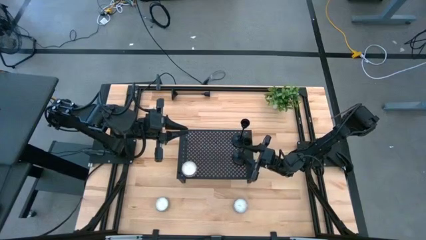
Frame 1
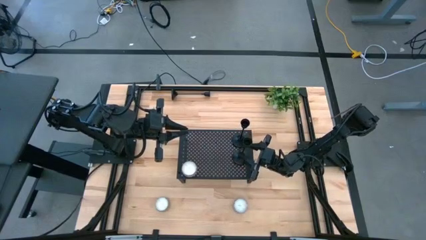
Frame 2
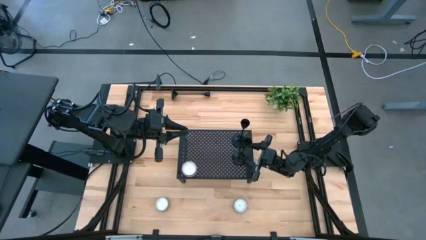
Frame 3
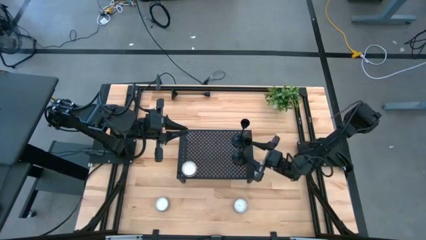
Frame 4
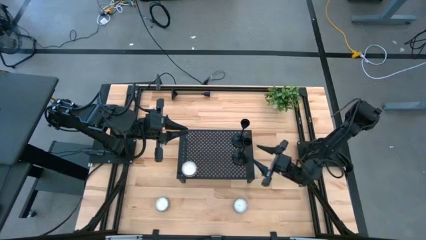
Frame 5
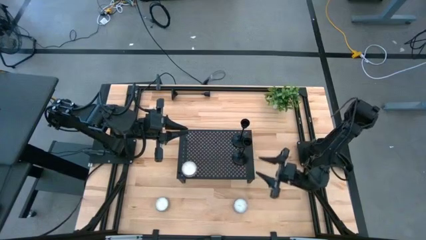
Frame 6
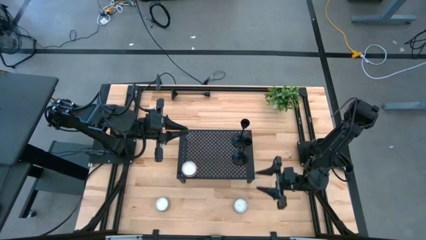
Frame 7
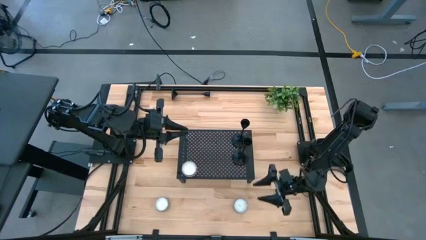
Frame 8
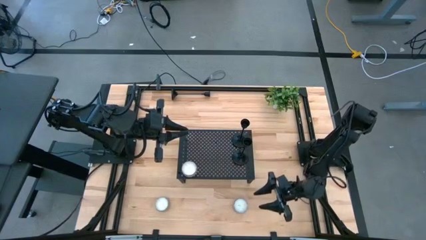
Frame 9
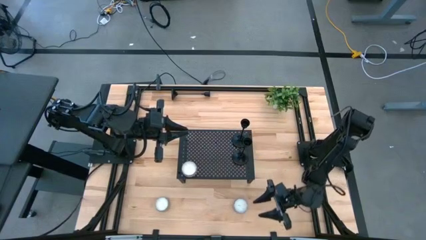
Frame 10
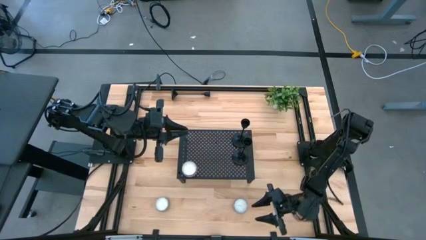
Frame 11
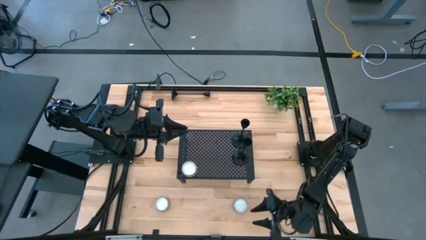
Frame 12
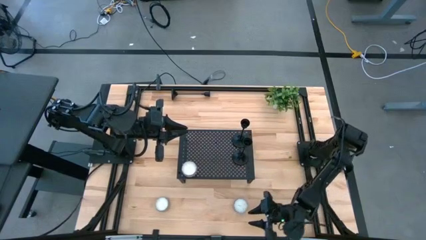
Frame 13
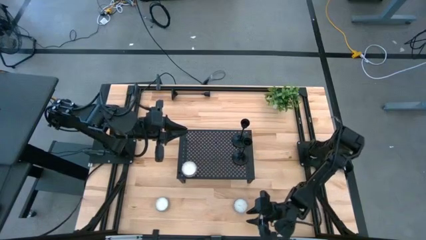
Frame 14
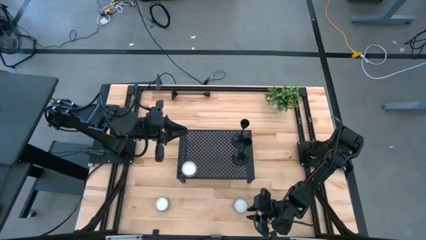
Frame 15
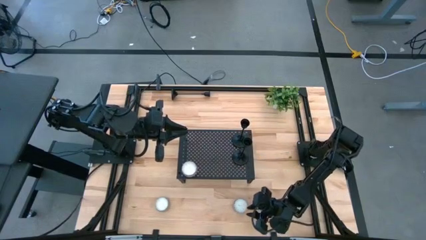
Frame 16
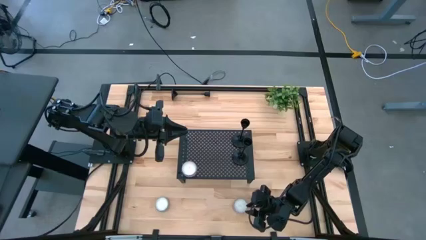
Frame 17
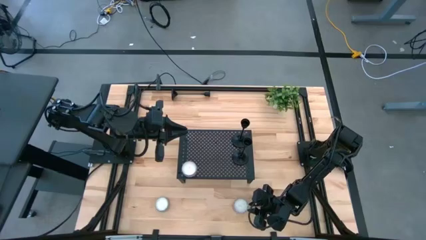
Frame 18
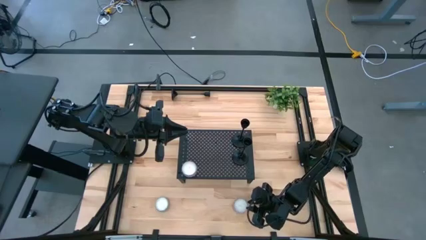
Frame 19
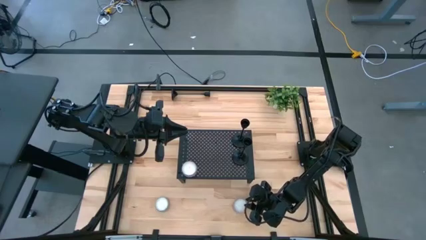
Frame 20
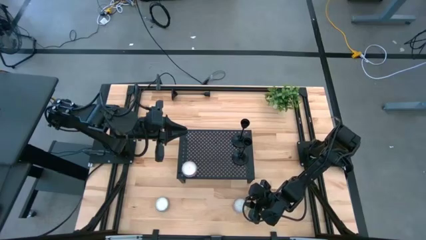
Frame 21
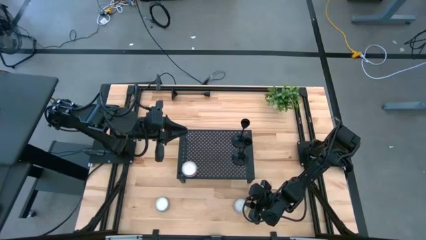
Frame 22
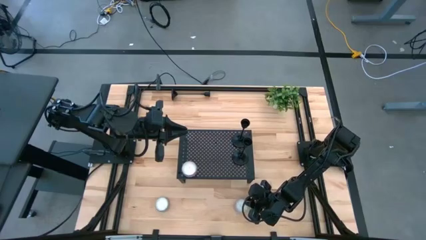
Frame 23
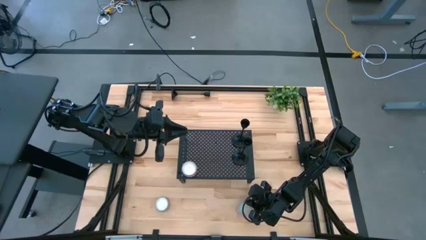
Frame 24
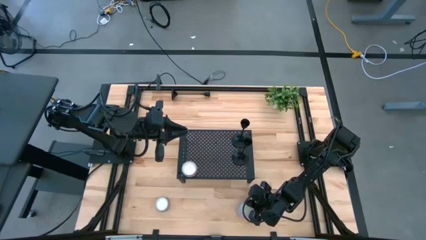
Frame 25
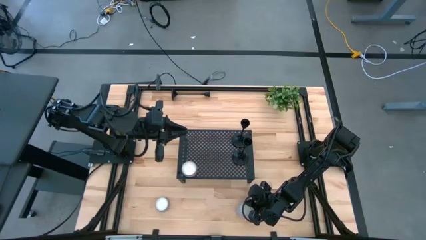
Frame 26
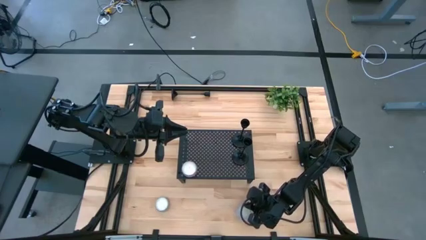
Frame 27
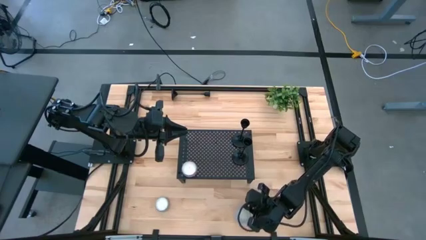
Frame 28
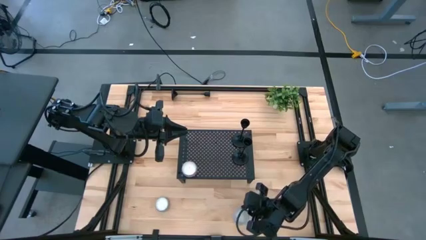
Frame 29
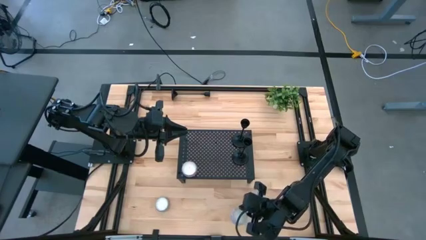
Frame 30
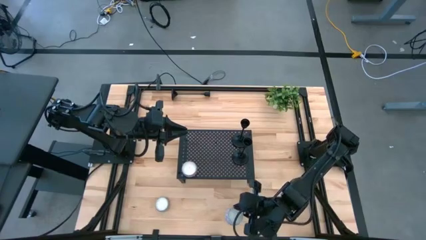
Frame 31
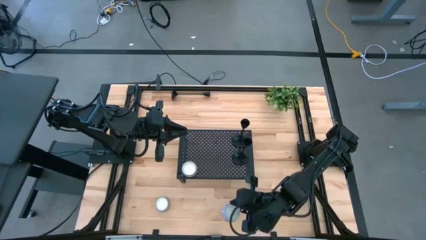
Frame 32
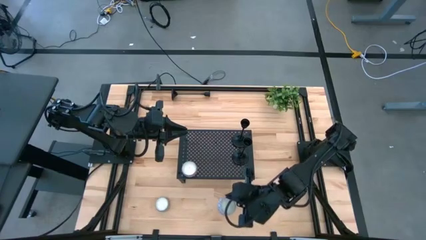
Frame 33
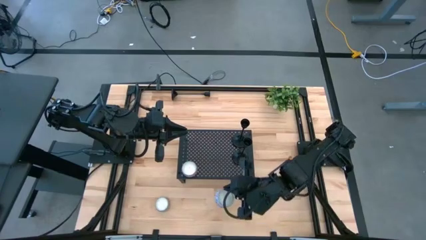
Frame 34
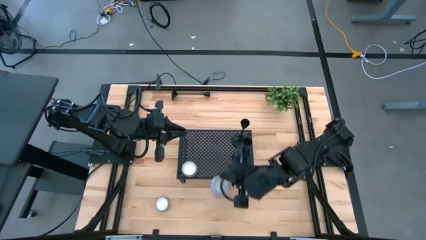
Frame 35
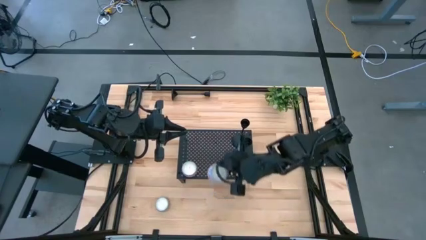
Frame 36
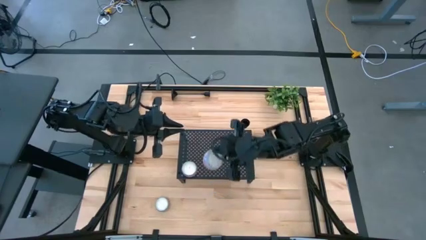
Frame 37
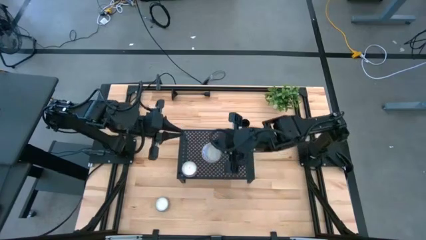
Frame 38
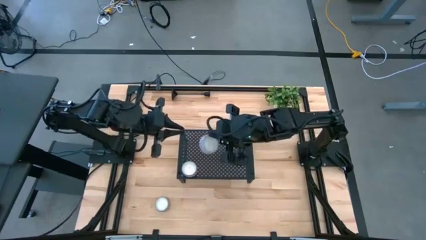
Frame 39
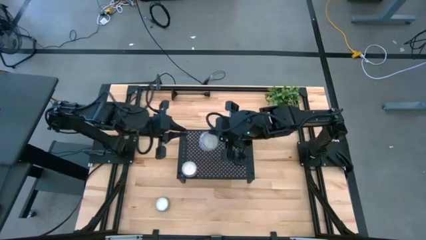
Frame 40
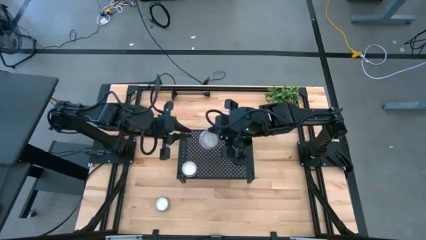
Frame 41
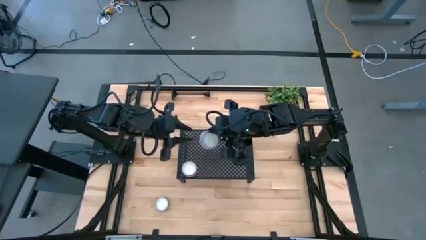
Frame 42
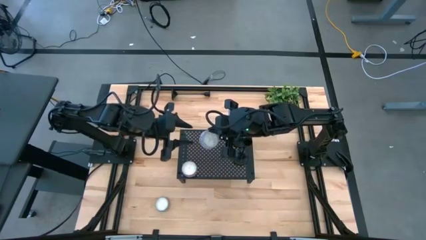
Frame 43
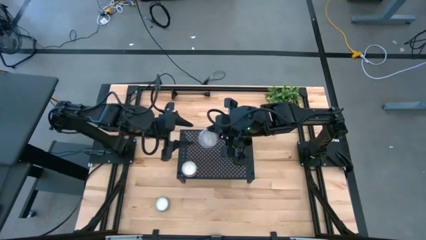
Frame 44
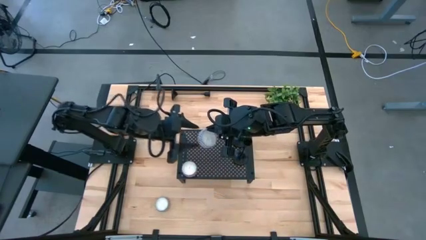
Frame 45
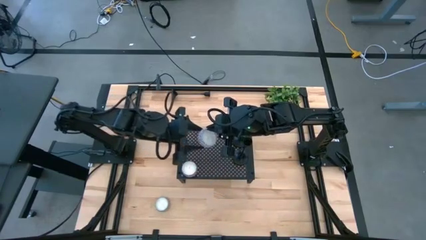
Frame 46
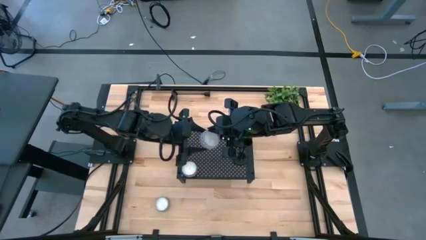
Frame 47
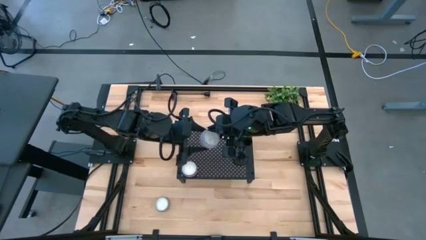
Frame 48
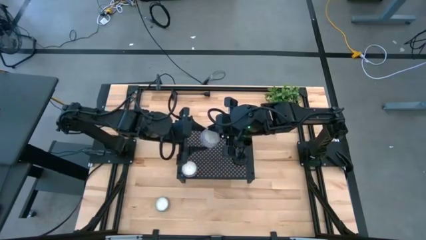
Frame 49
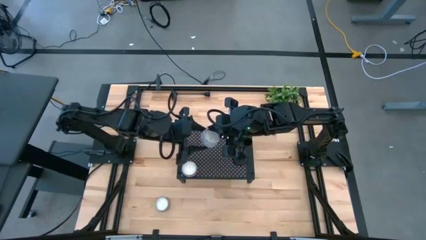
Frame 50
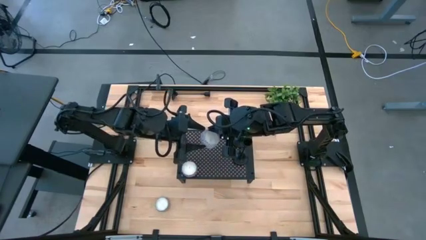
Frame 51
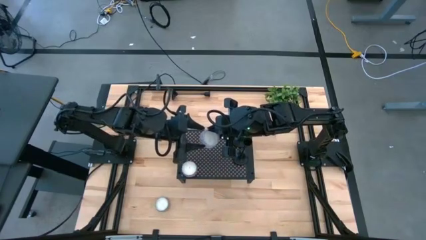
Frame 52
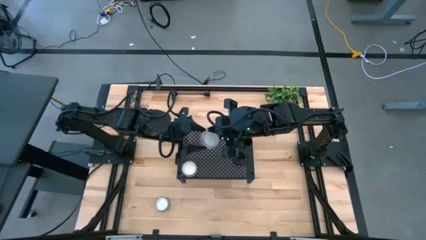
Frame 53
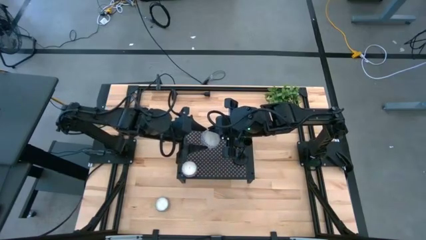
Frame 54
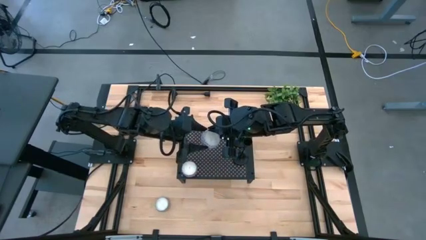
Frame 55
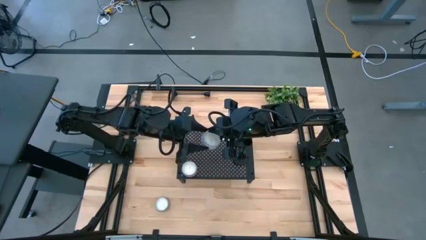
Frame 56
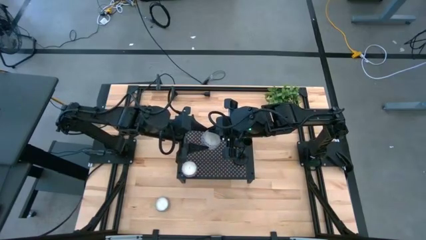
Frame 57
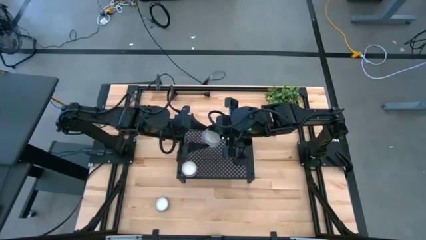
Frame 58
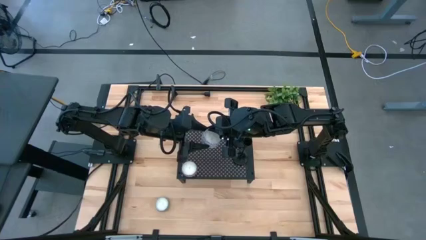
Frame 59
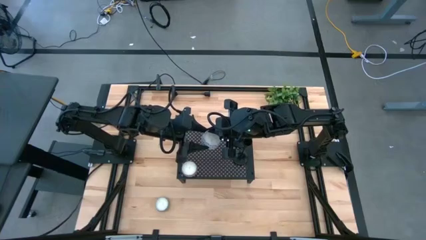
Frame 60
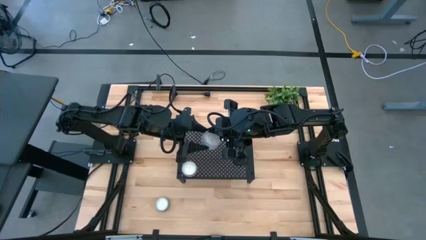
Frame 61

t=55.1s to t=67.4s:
Task: Pick & Place candle stick holders
Put the red patterned scented candle on the shelf aligned with the other scented candle

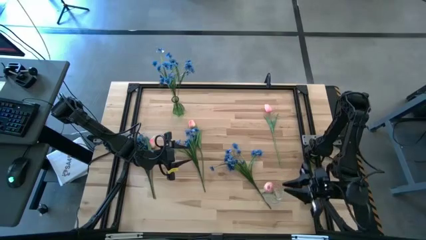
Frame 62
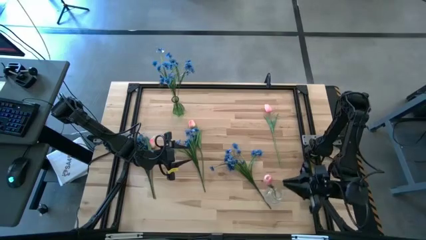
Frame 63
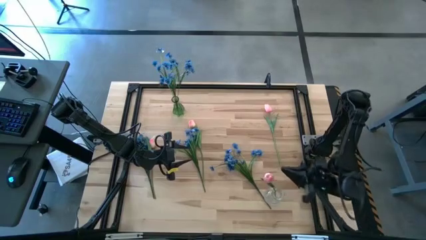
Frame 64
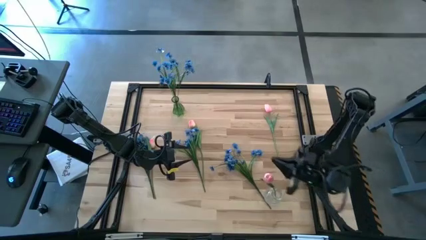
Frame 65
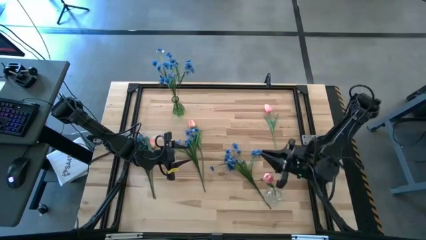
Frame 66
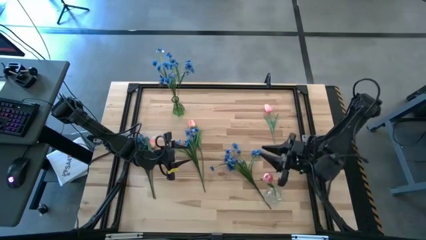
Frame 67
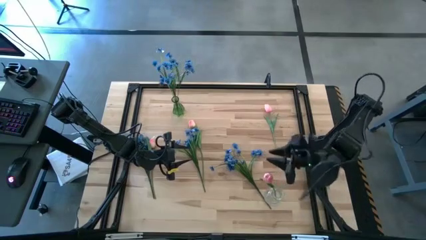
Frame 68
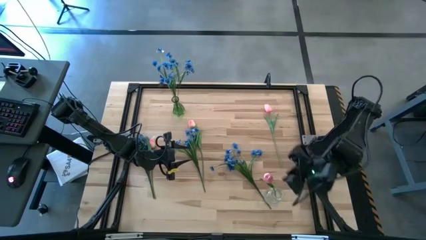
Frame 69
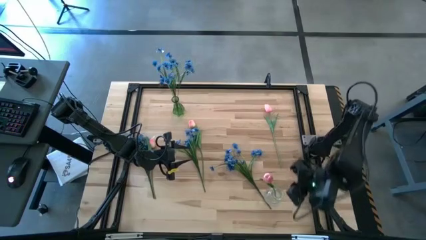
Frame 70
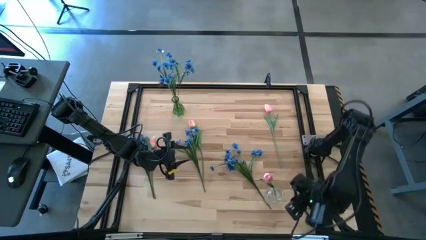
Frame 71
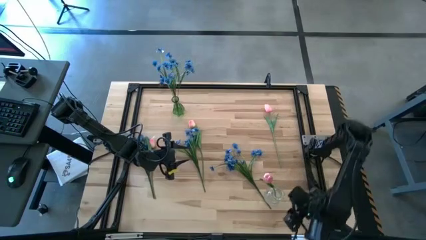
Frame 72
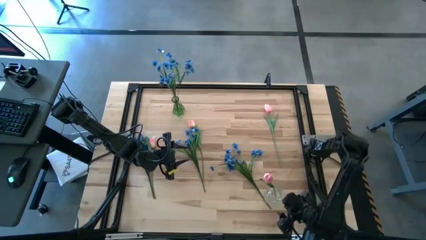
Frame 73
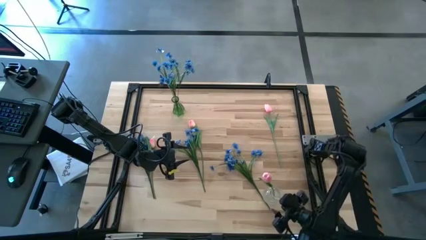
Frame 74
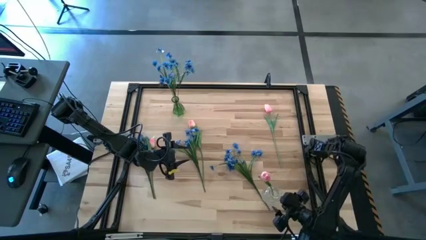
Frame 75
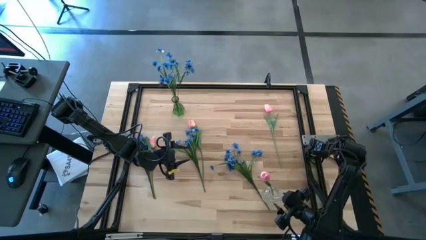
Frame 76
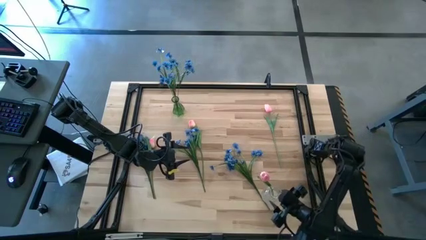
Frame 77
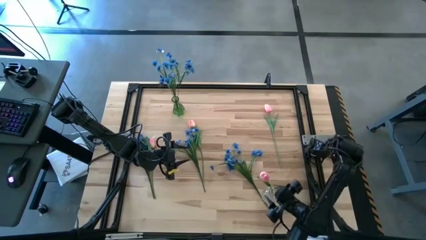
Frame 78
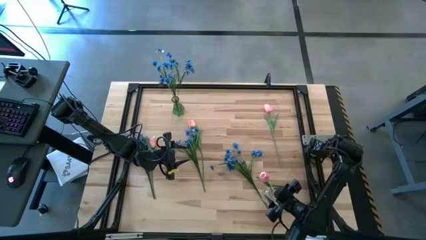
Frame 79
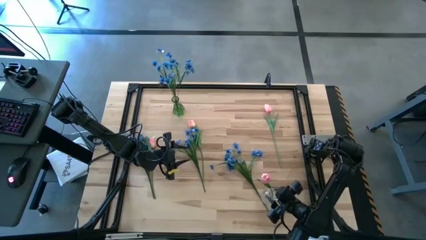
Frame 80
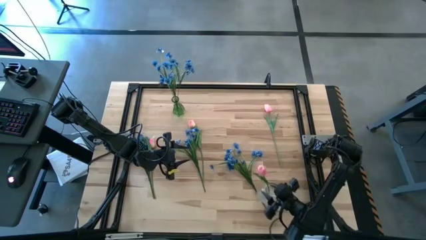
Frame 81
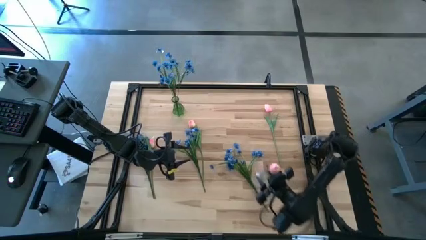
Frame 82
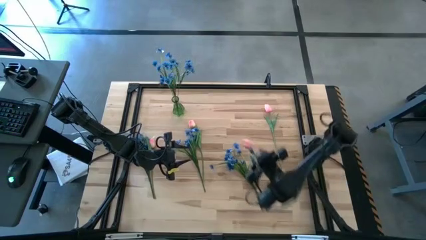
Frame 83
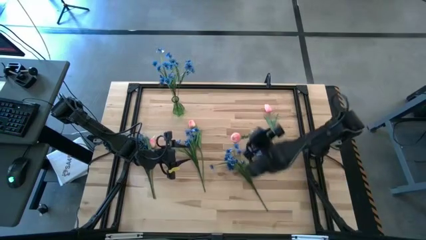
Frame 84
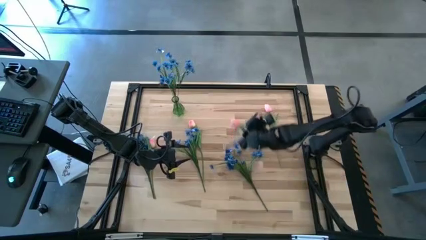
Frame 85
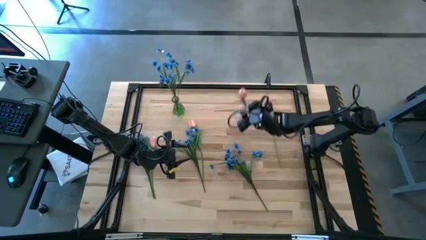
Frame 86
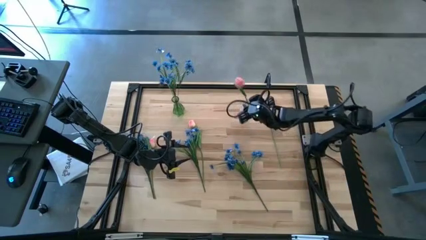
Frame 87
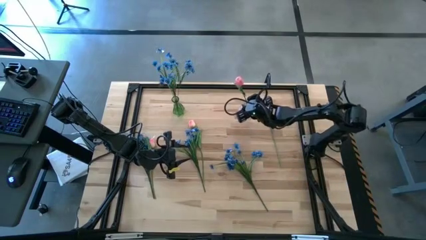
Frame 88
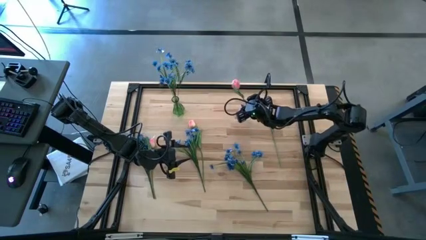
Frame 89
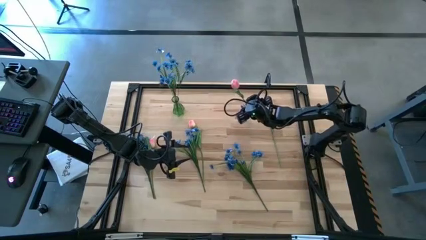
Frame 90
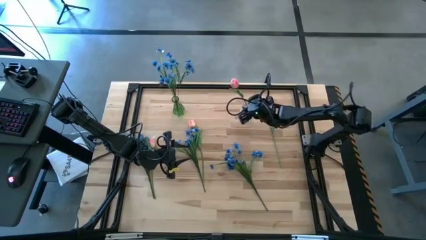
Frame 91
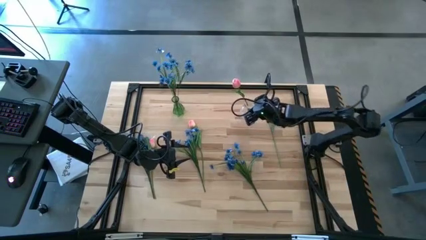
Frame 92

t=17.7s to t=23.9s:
Task: Sort flowers into vase by color
Move the transparent vase to the top right of the table
